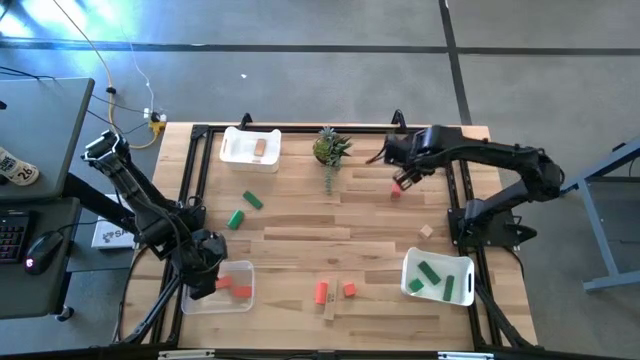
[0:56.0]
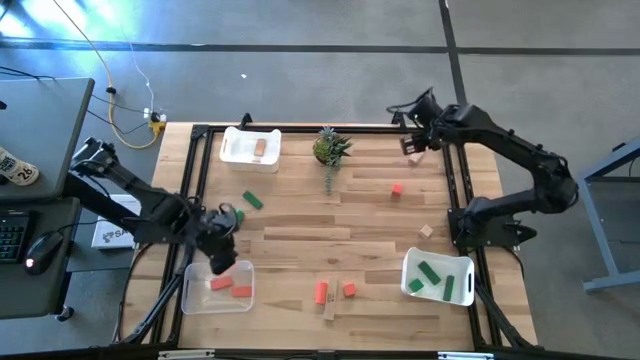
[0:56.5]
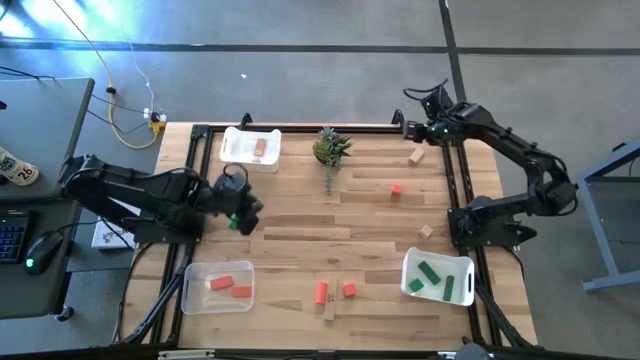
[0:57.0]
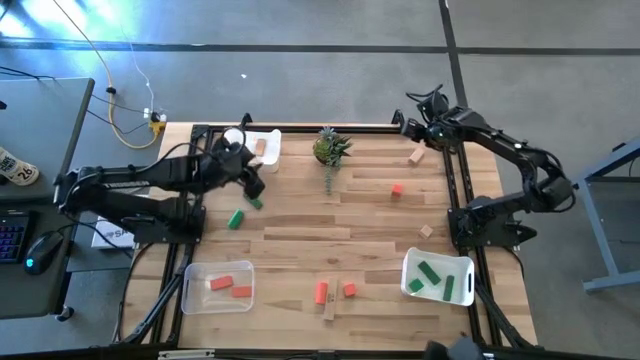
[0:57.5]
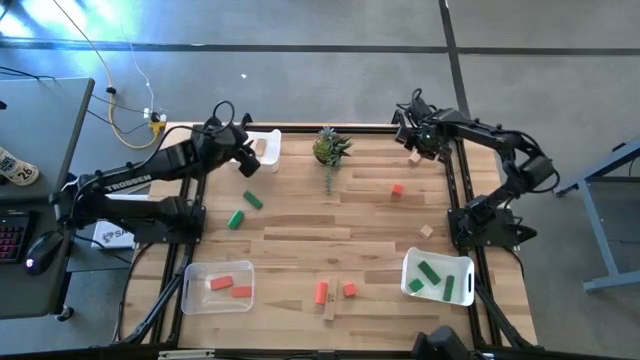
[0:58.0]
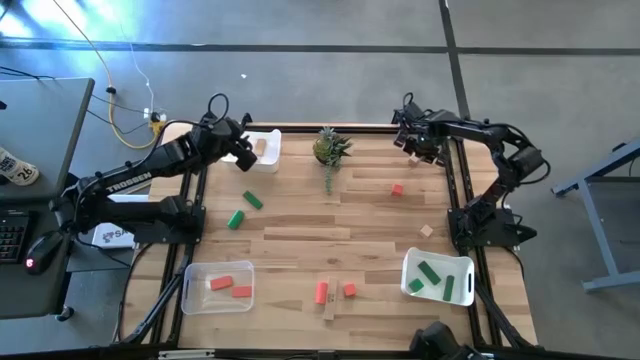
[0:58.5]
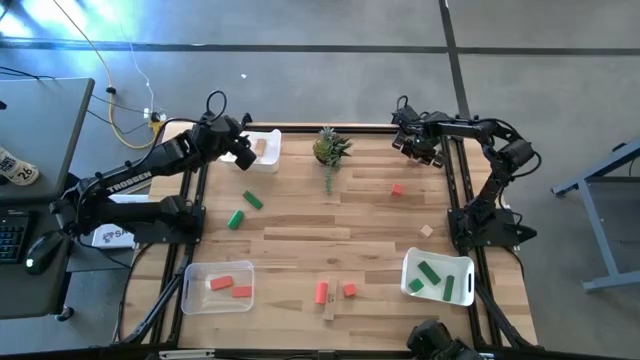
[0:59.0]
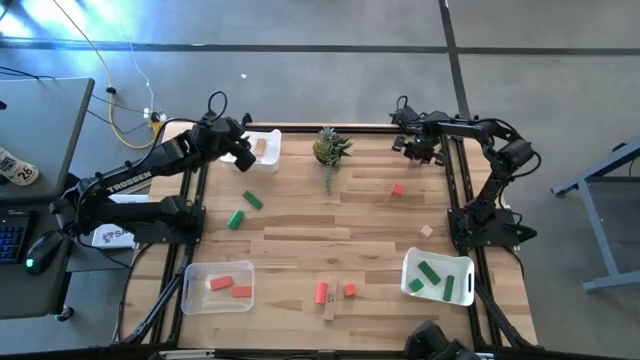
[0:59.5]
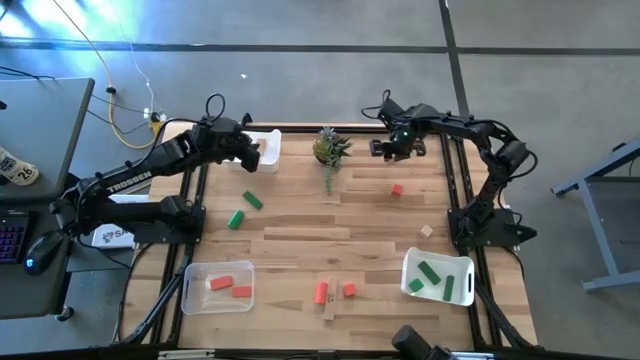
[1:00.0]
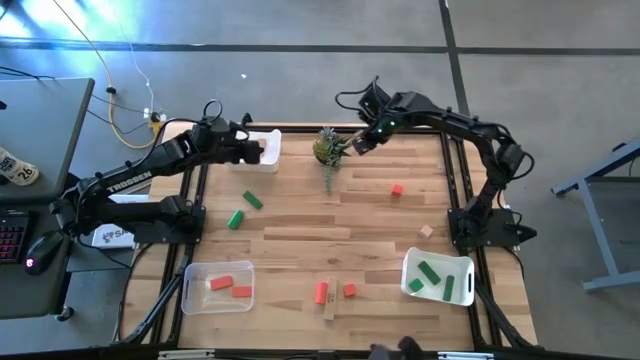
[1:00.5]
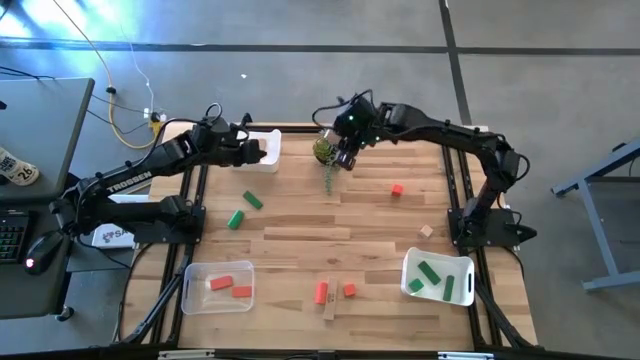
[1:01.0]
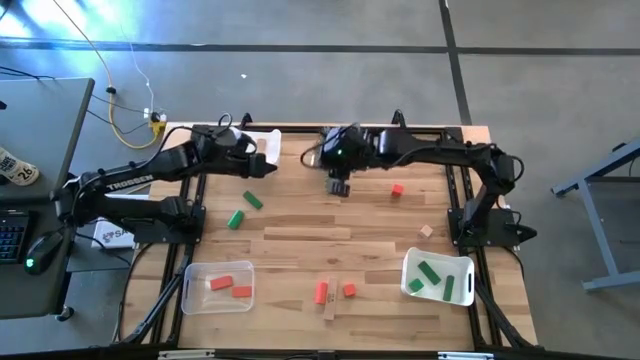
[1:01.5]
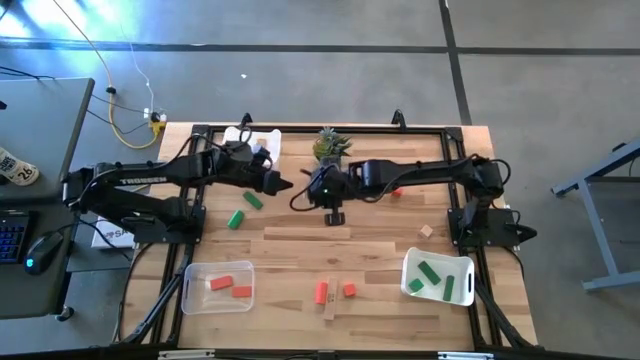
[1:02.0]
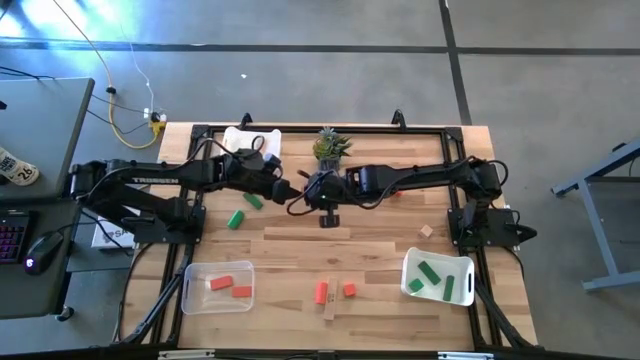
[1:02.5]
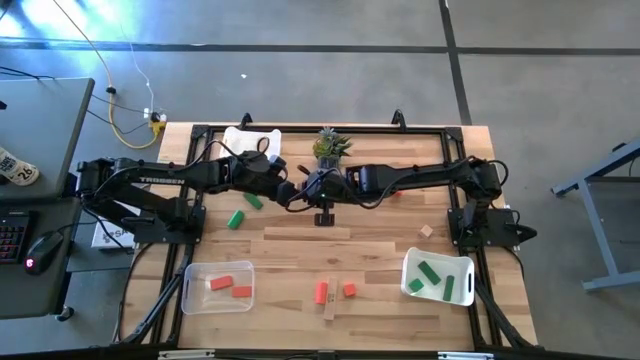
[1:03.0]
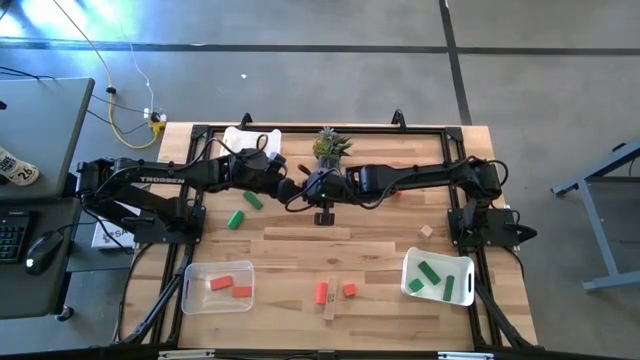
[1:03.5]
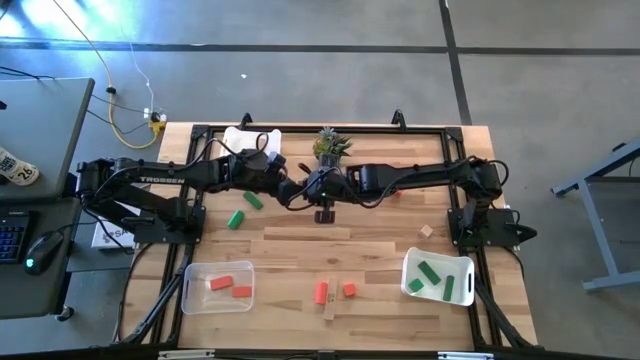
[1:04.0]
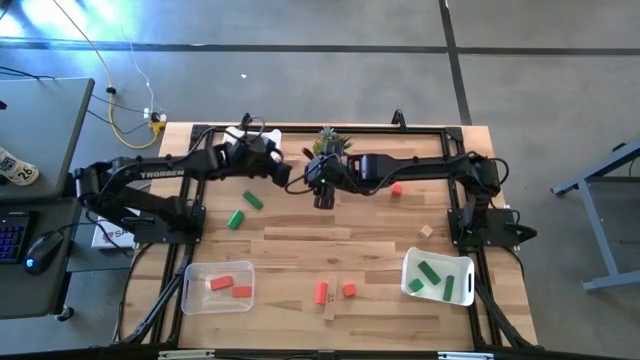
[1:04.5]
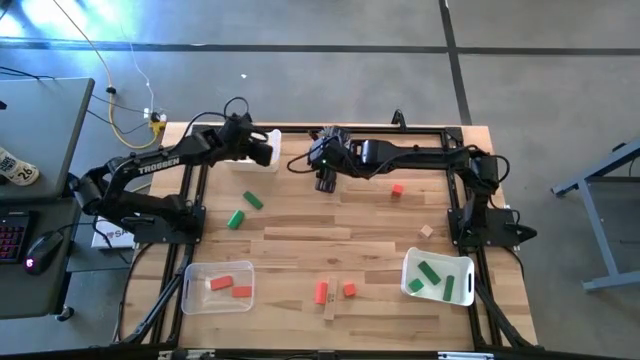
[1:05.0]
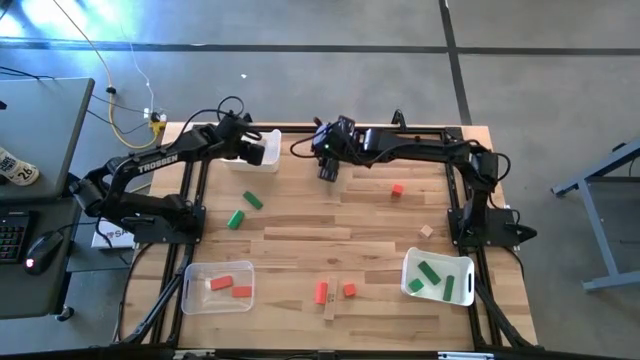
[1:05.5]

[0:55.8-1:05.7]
Task: Sort & place blocks by color
Put the brown block into the top white bin

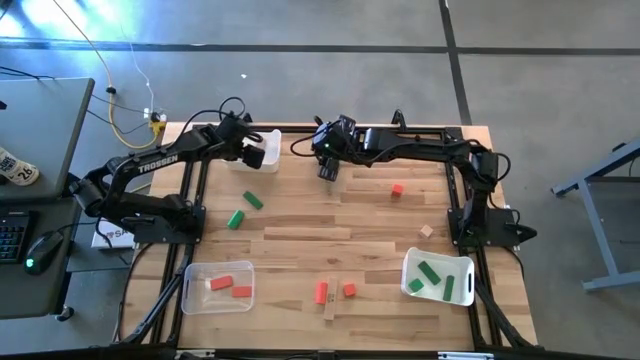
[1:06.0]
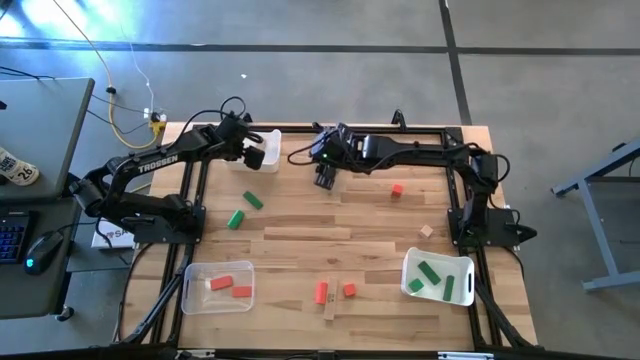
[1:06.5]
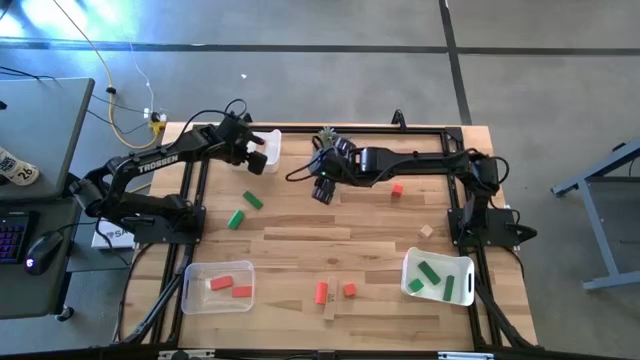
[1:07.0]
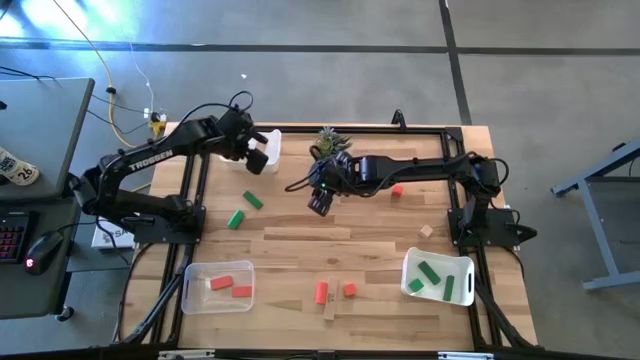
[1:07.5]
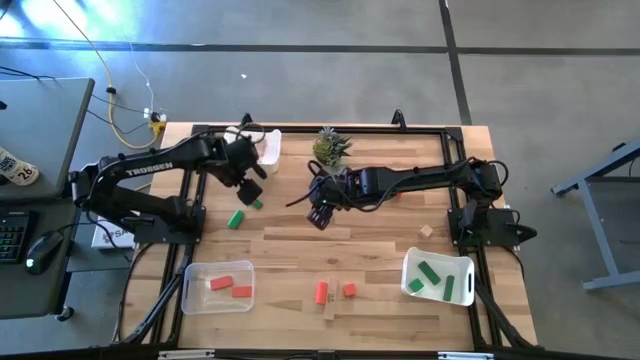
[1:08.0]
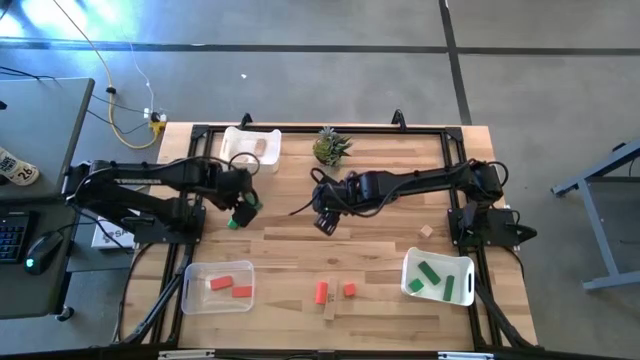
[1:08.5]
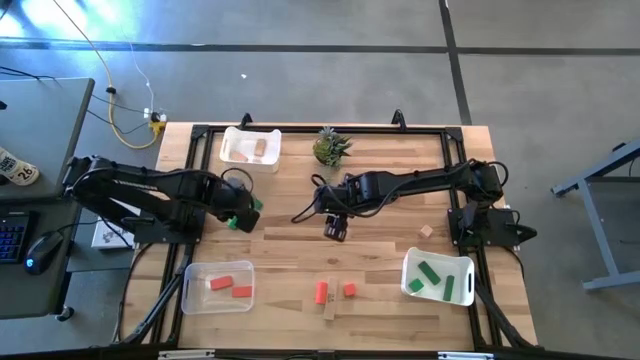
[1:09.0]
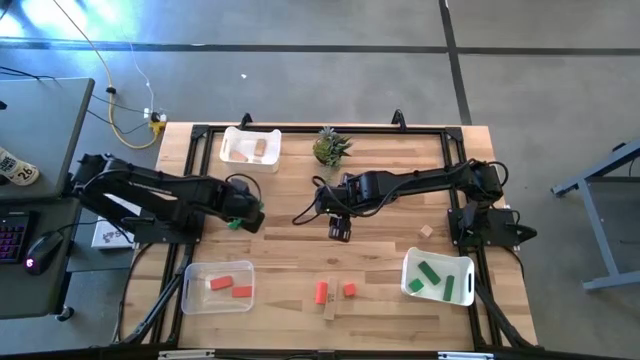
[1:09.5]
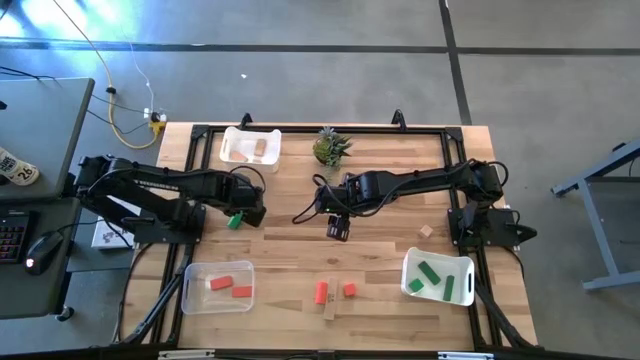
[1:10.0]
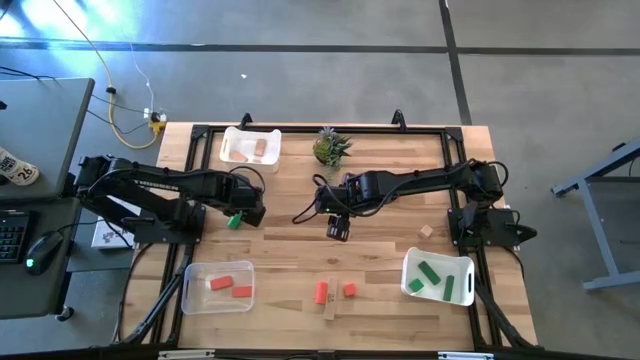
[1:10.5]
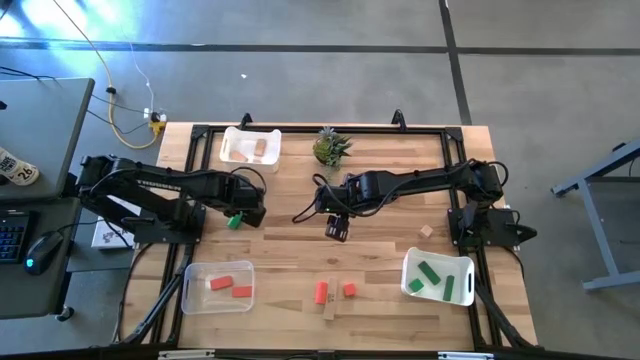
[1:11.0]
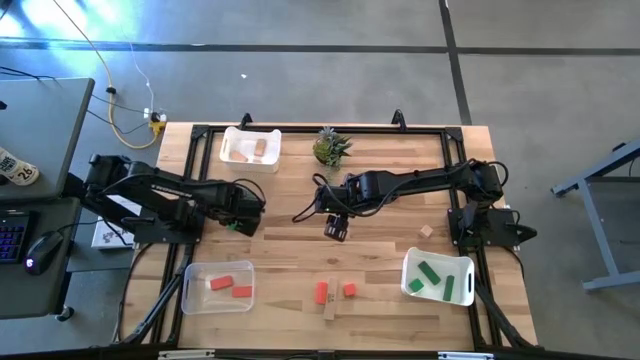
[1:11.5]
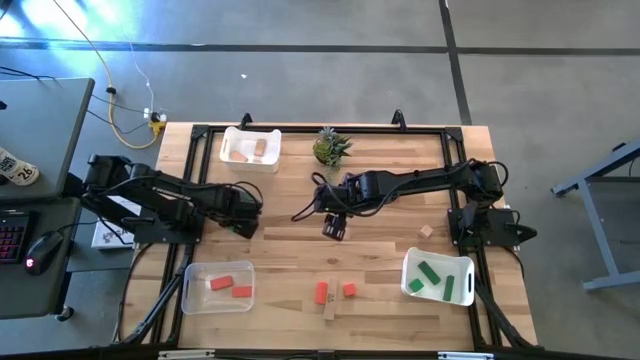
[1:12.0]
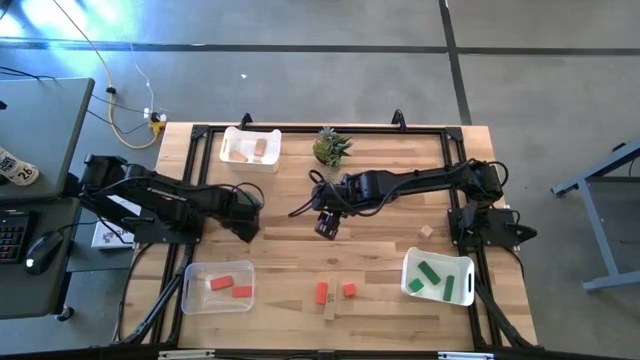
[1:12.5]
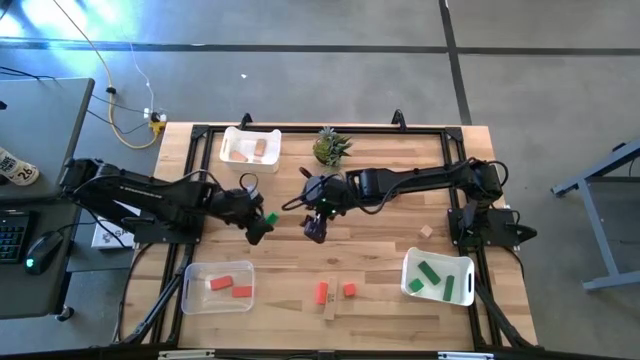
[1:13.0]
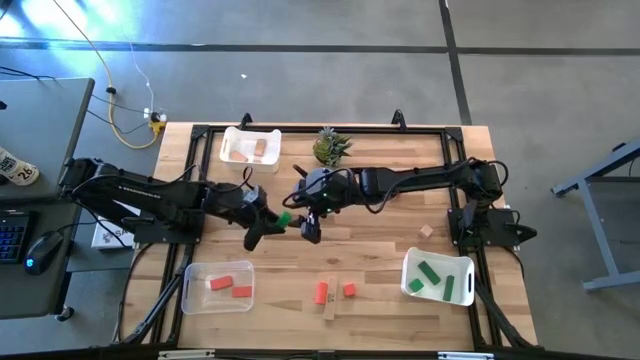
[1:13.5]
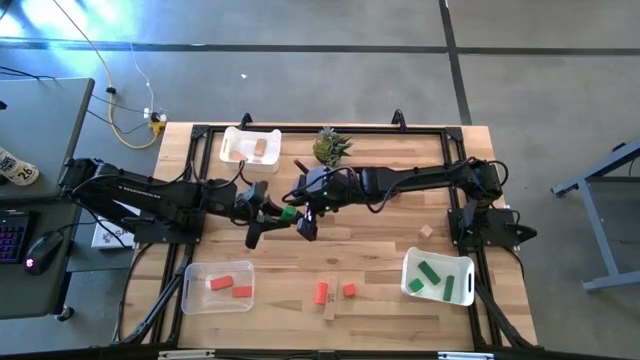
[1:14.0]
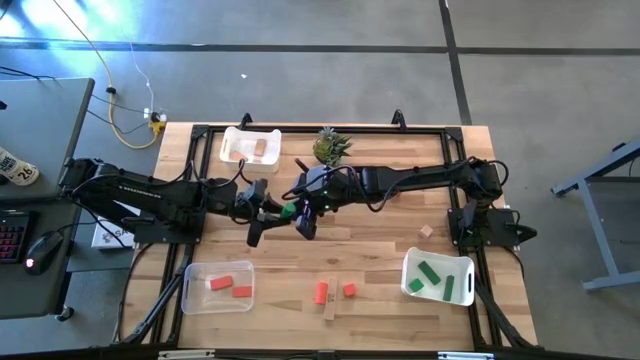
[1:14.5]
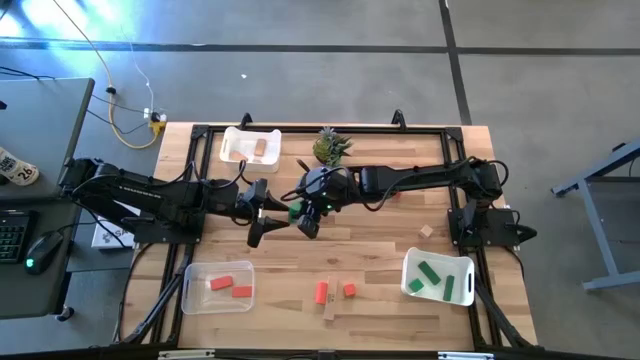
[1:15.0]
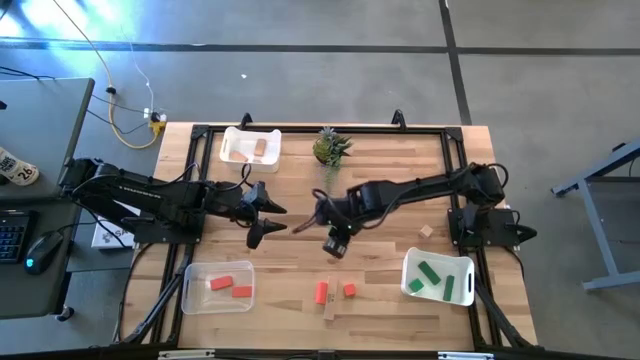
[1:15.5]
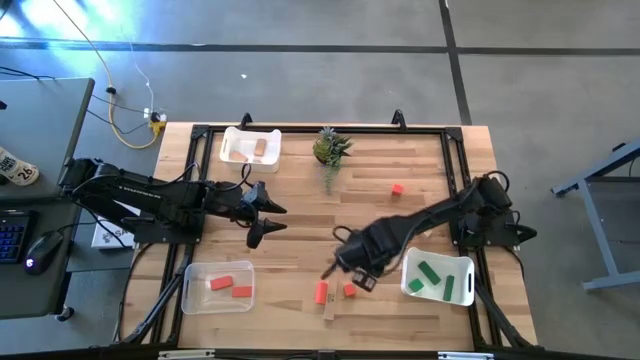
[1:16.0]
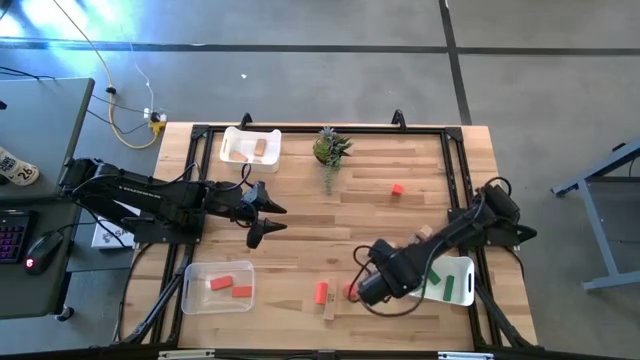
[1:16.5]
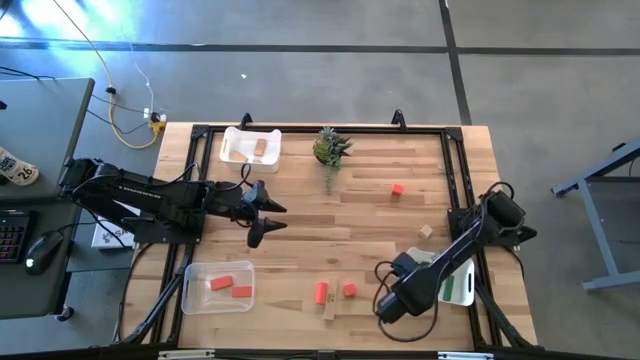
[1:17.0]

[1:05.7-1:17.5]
Put the green block into the bottom white bin
